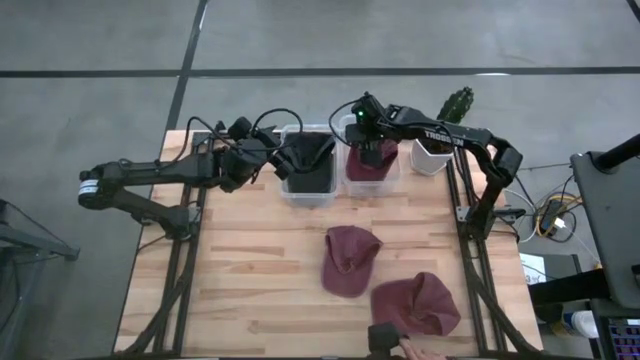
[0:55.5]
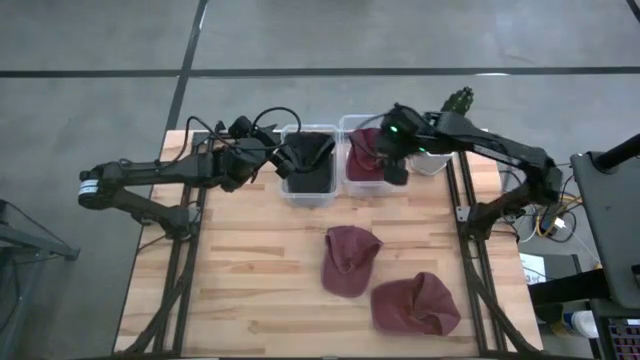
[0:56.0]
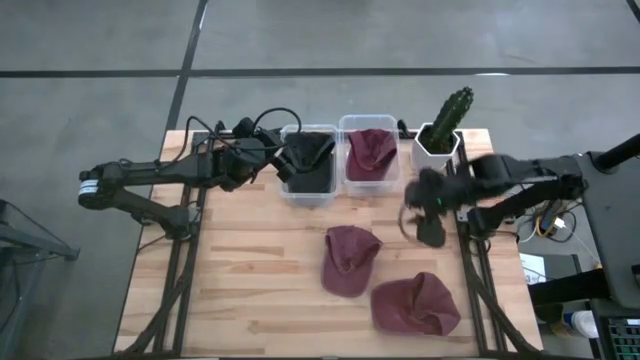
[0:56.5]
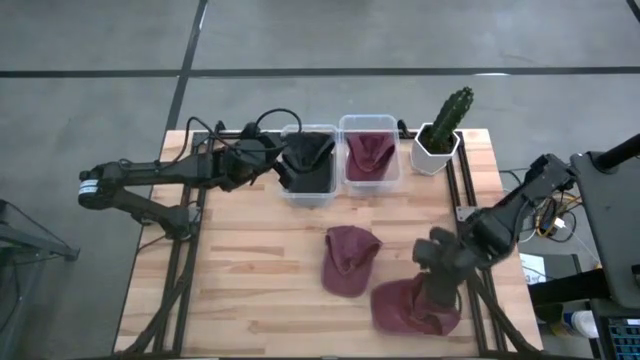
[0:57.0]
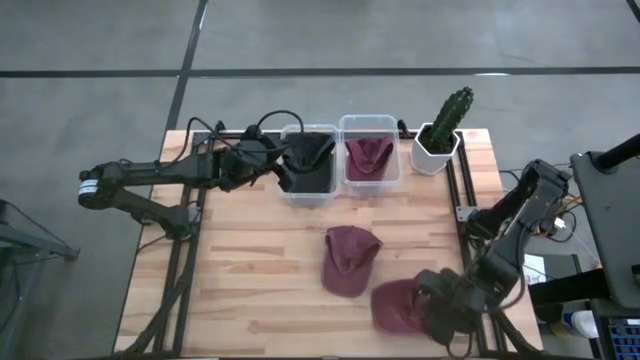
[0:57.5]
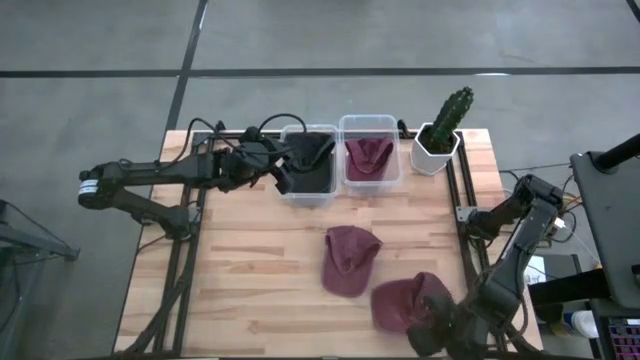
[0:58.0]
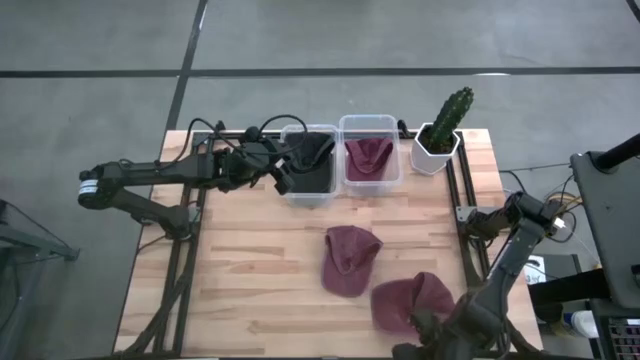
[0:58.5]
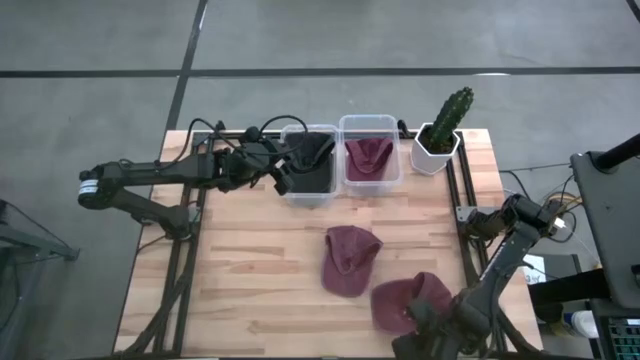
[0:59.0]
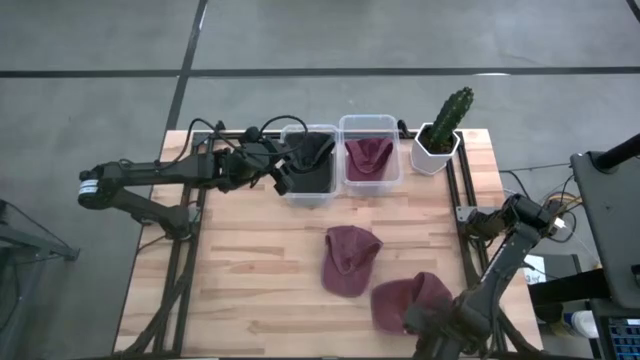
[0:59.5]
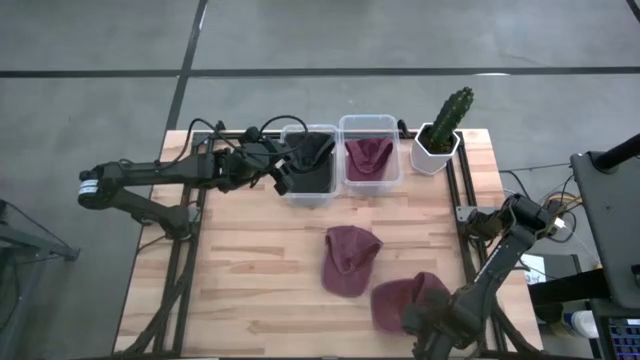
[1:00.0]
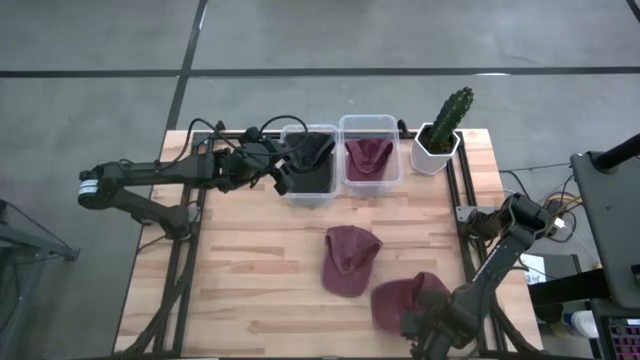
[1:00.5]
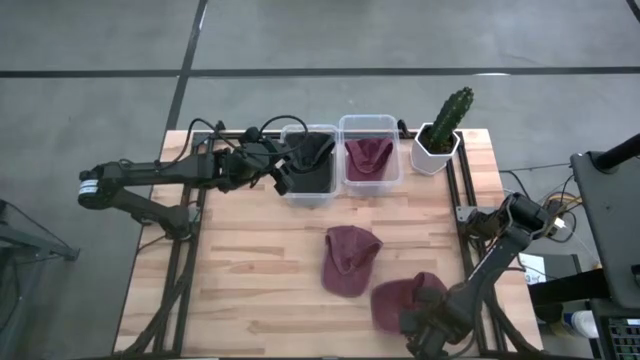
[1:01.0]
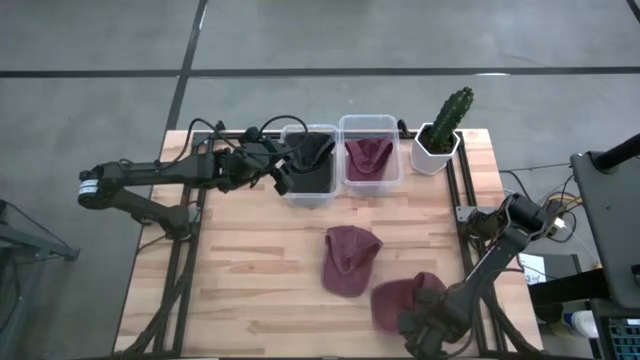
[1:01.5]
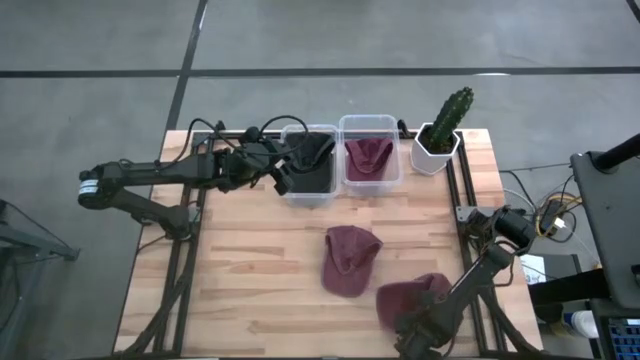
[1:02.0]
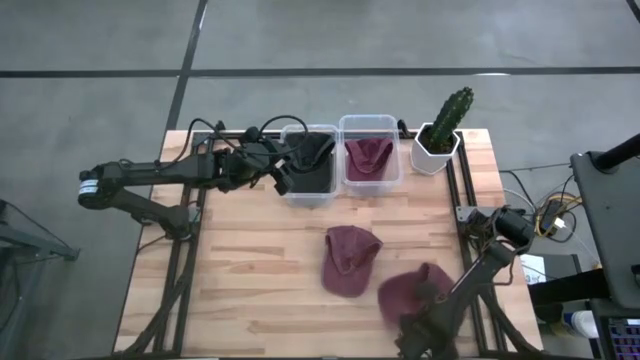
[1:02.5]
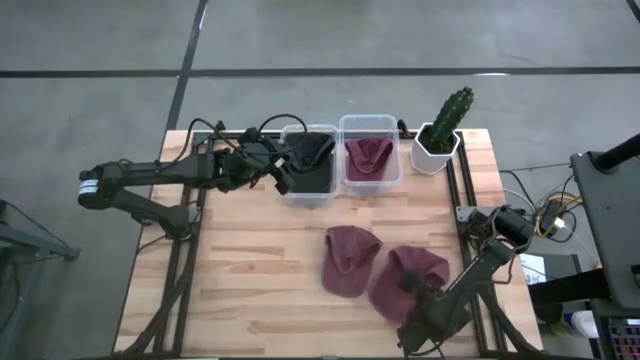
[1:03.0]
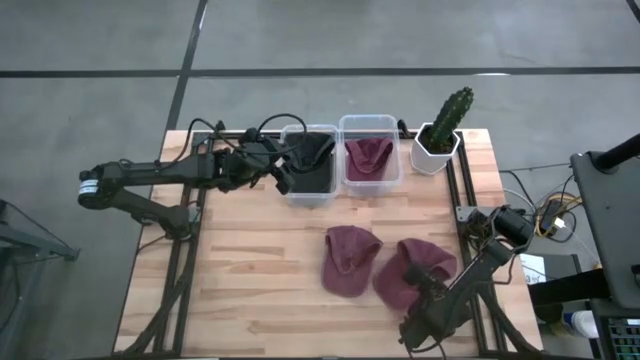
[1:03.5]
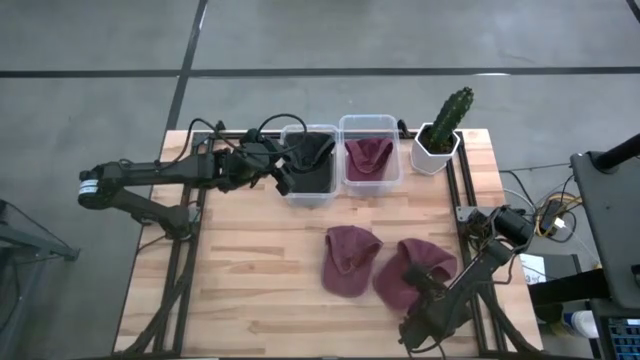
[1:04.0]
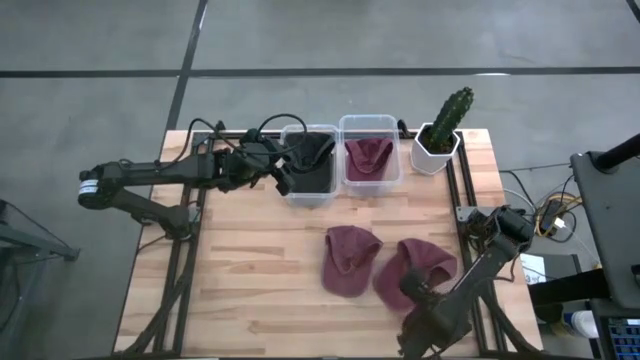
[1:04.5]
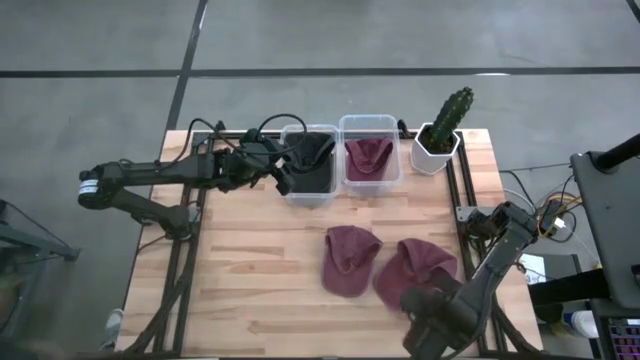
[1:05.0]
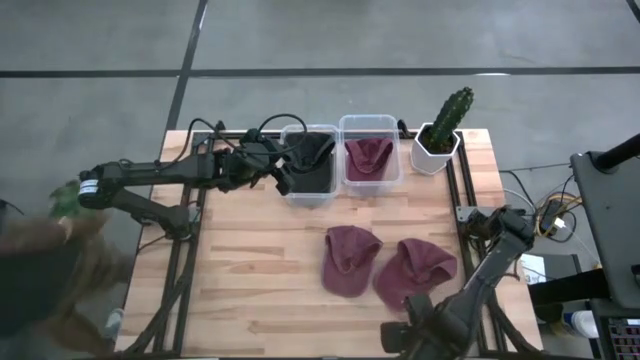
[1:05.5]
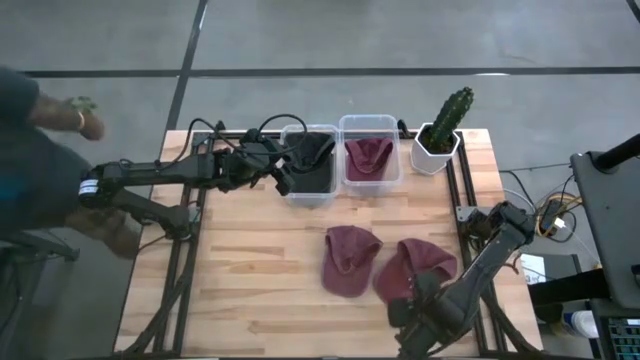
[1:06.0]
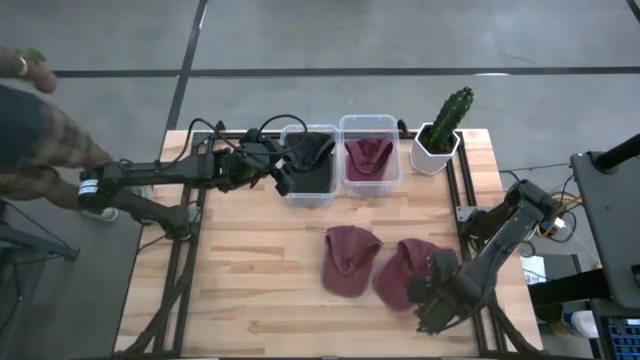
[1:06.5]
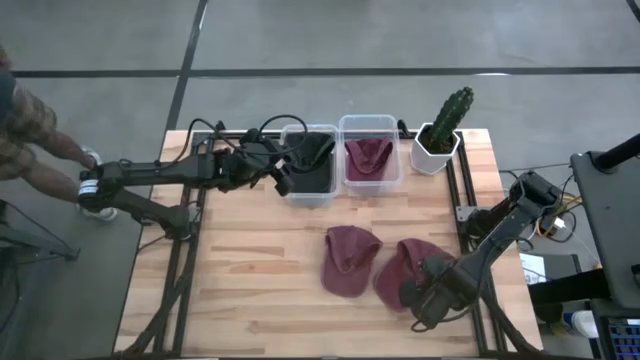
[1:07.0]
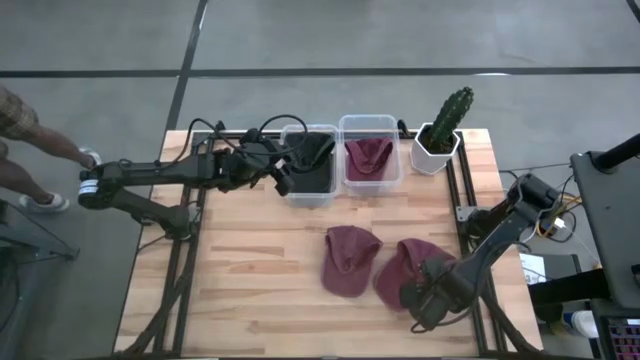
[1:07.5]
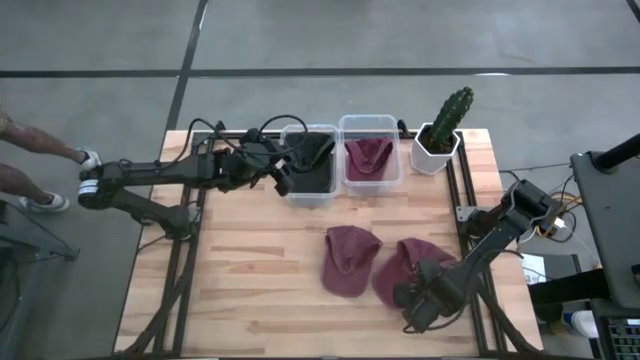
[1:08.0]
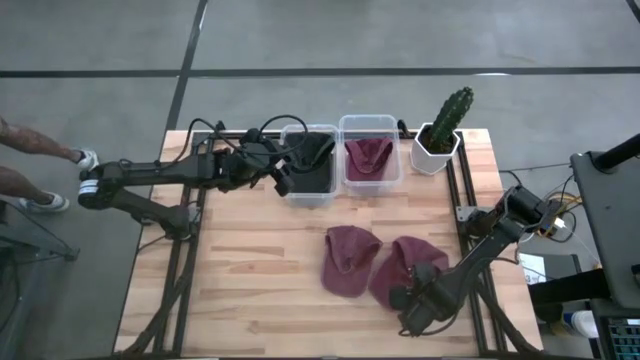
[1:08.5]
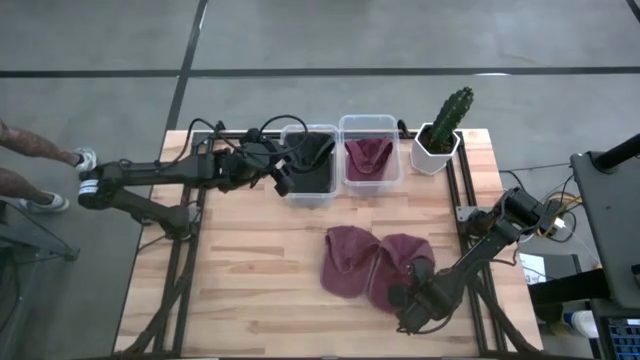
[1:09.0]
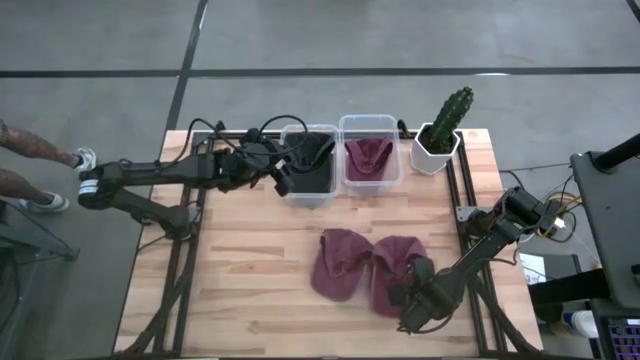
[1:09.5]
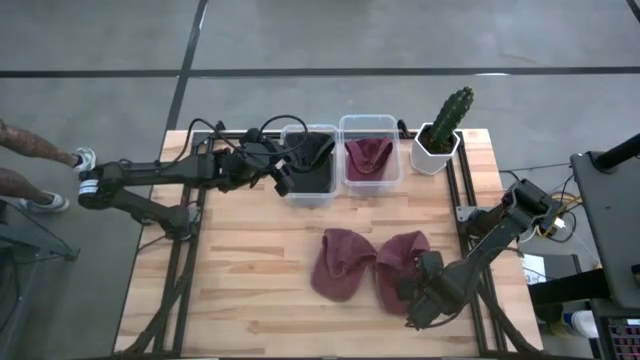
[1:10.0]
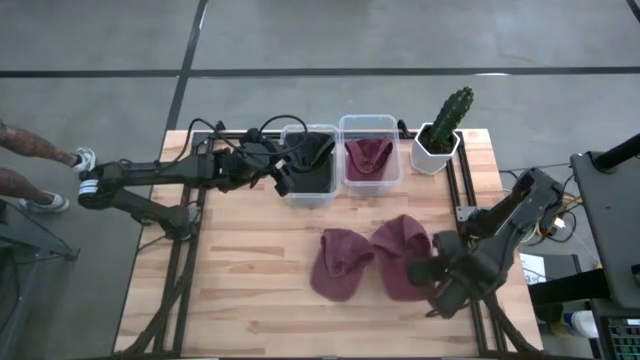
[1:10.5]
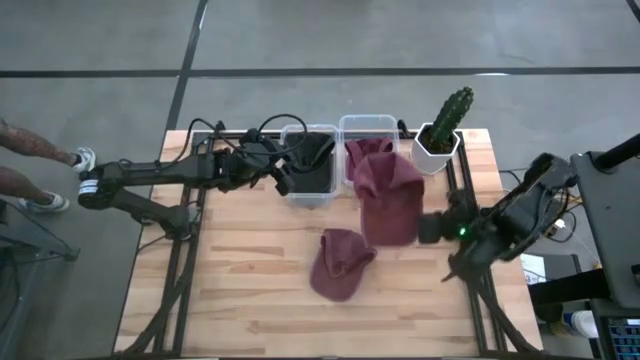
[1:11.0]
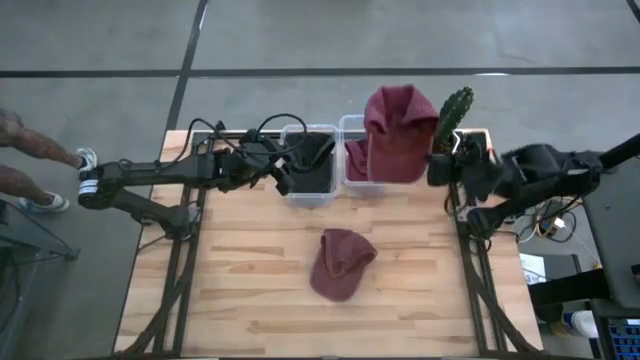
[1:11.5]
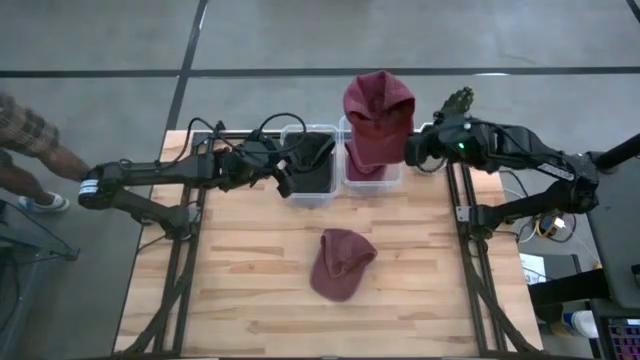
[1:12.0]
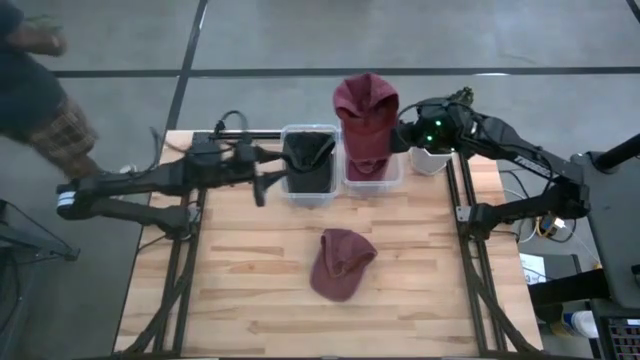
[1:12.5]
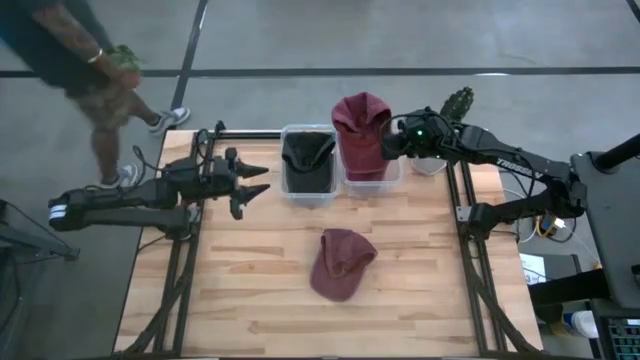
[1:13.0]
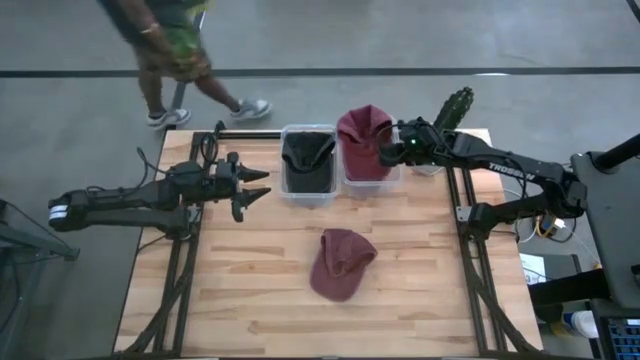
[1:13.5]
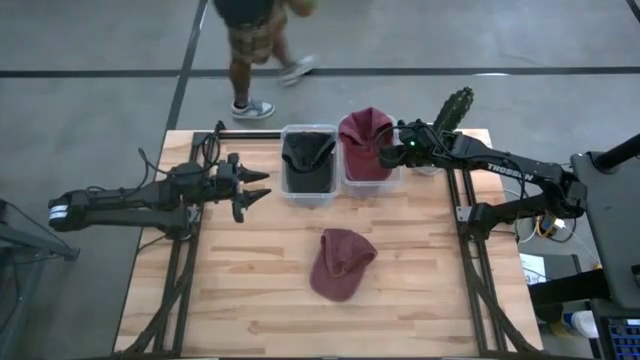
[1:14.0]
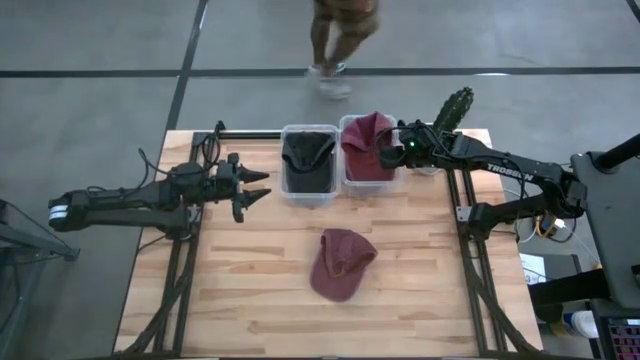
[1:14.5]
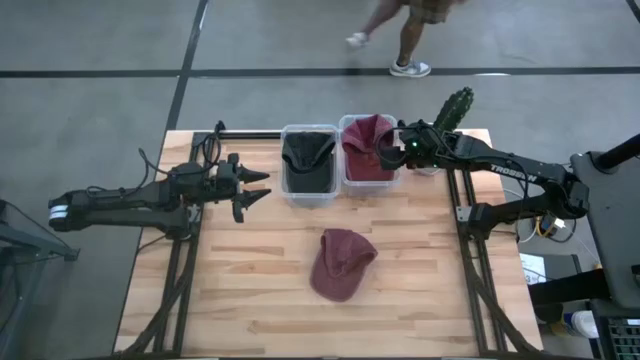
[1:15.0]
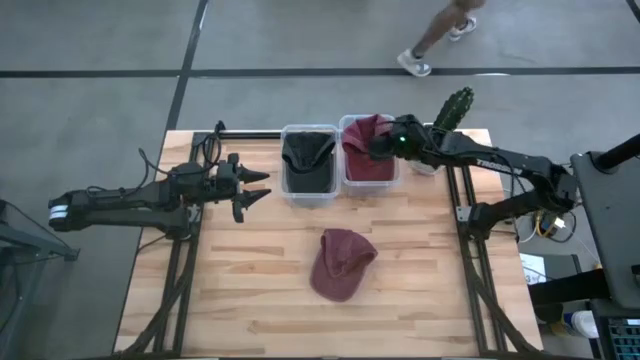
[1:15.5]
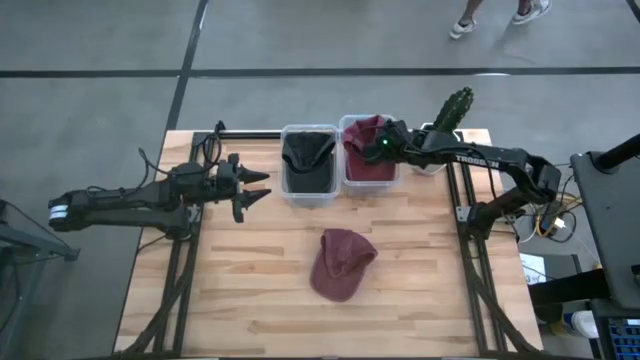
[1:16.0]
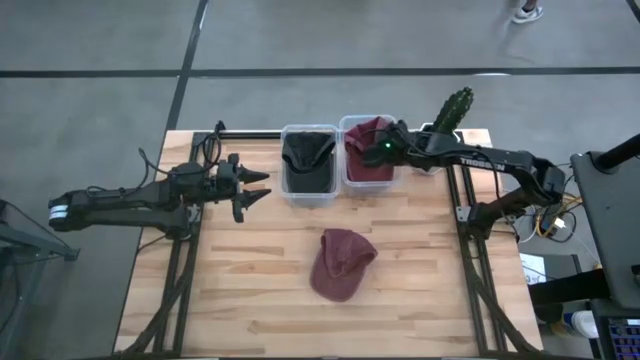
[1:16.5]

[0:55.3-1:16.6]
Task: Pick & Place hat
Put the right red cap into the right transparent bin
